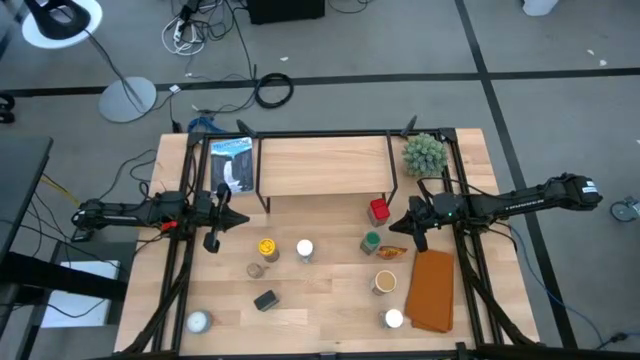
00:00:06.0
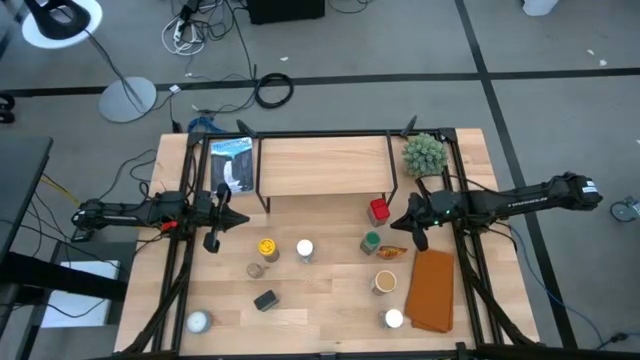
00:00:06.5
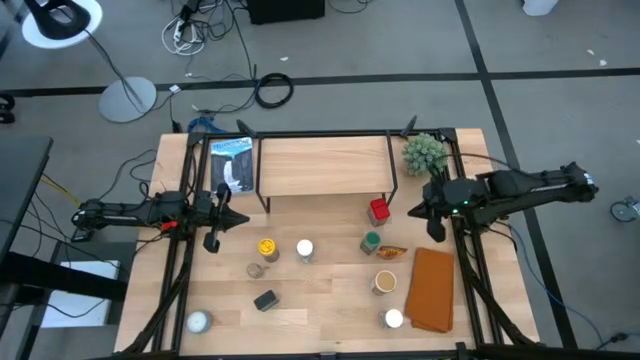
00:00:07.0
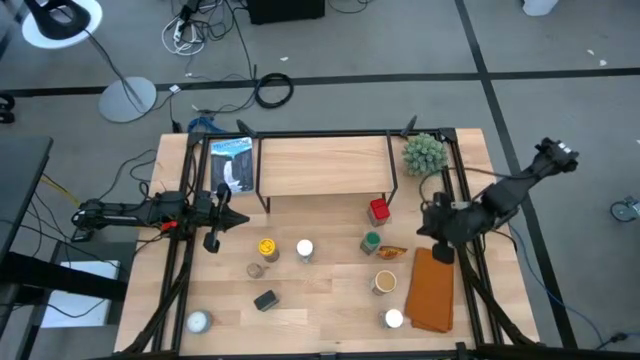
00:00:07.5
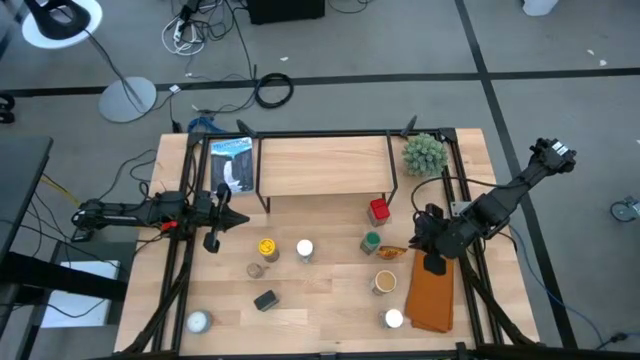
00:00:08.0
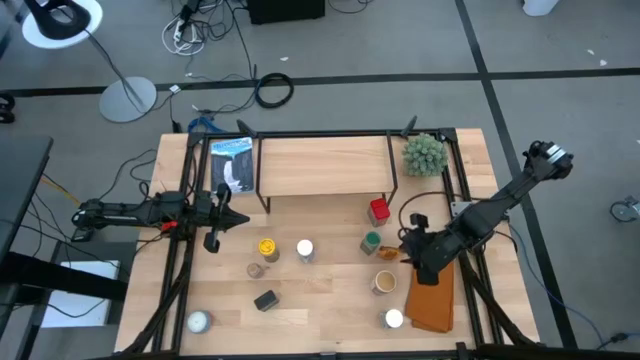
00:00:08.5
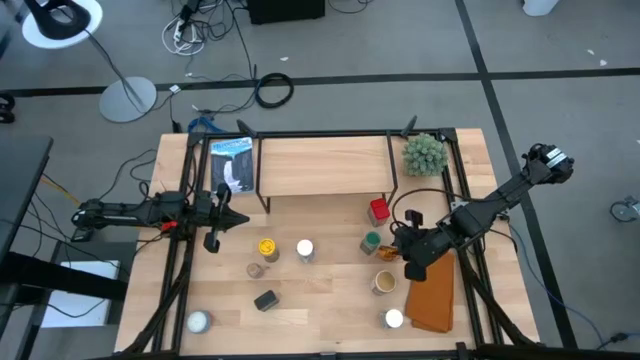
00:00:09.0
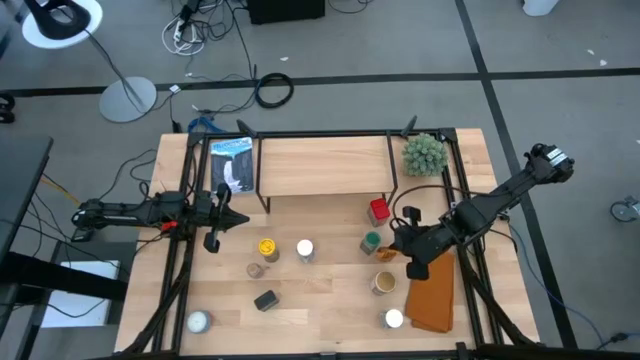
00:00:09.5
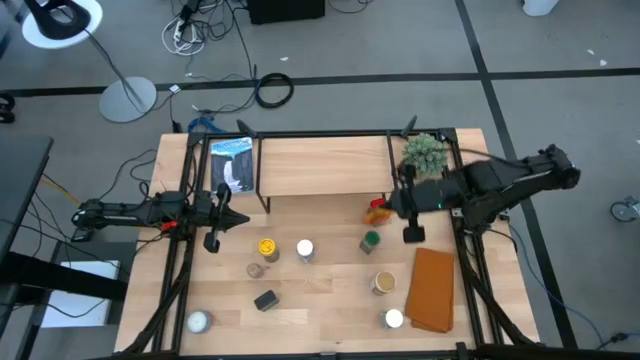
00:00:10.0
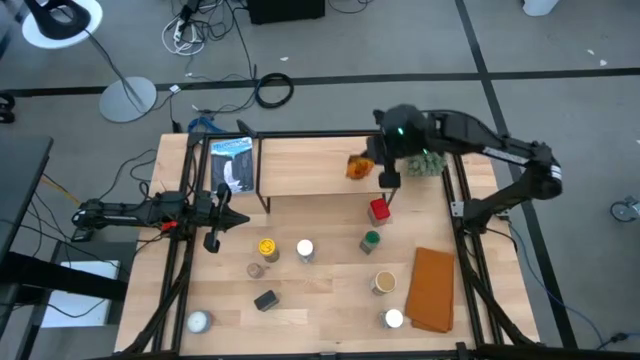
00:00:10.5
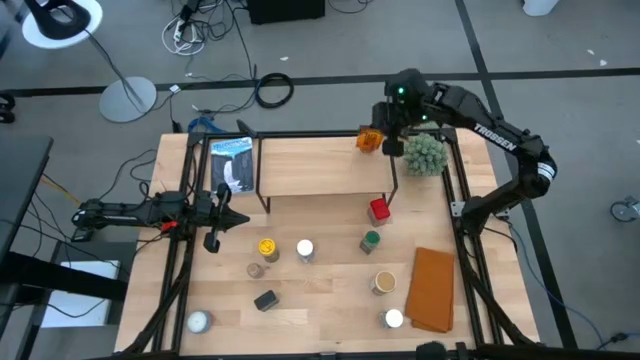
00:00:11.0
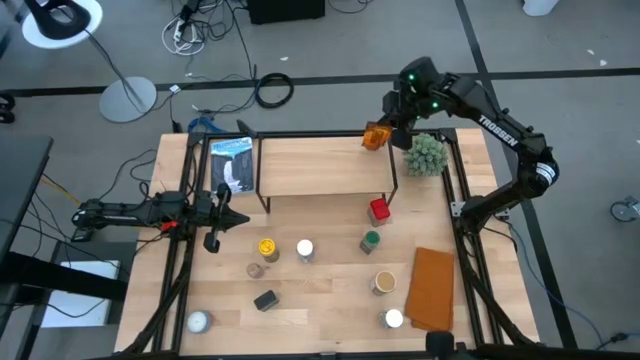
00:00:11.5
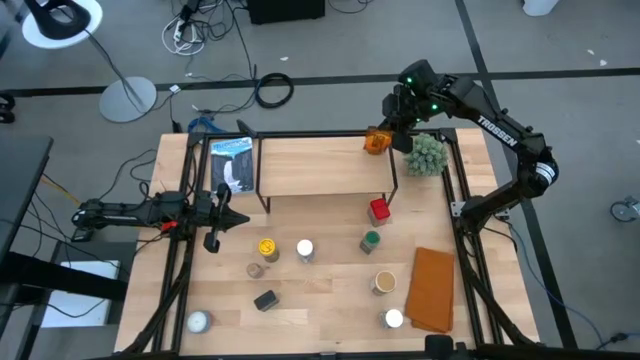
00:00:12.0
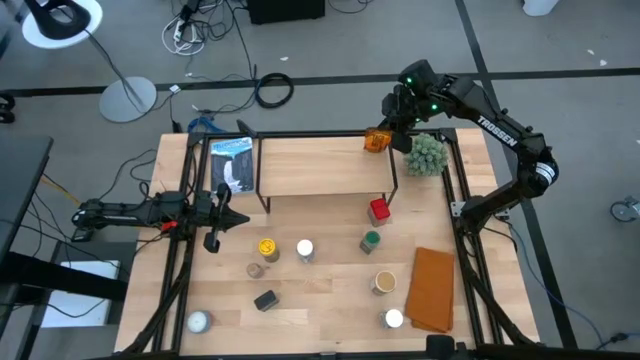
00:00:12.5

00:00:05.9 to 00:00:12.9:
Task: Shelf spices
Put the orange seasoning pack on the shelf

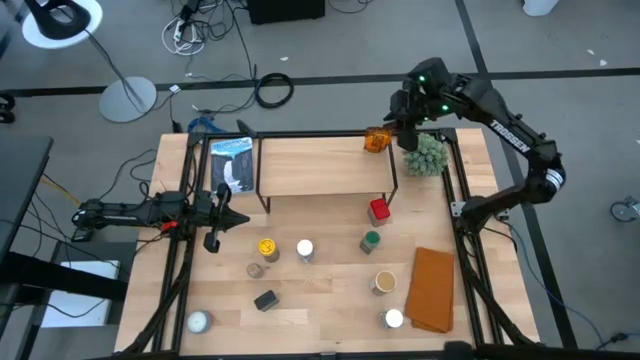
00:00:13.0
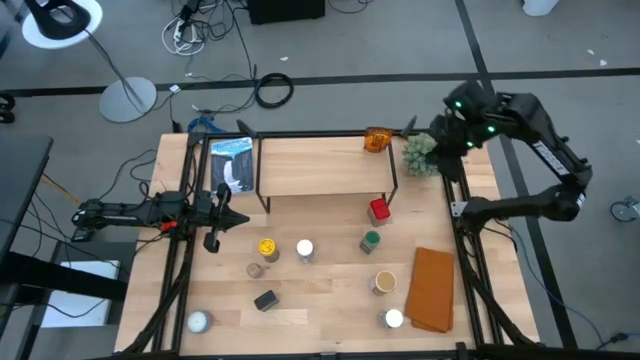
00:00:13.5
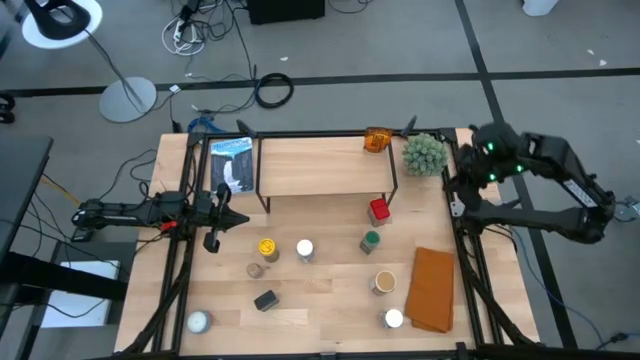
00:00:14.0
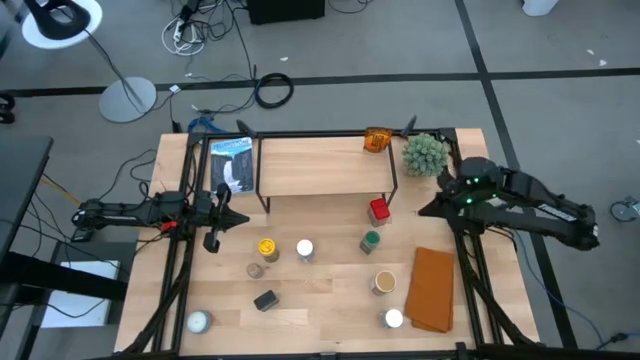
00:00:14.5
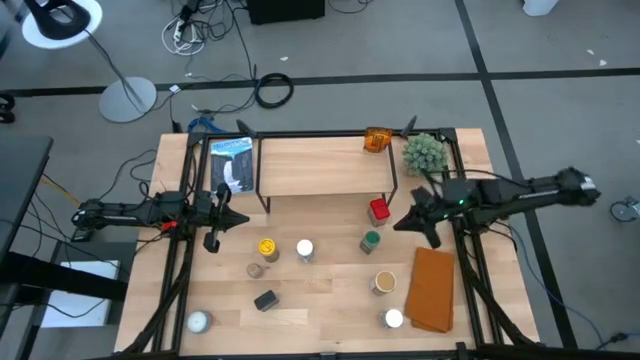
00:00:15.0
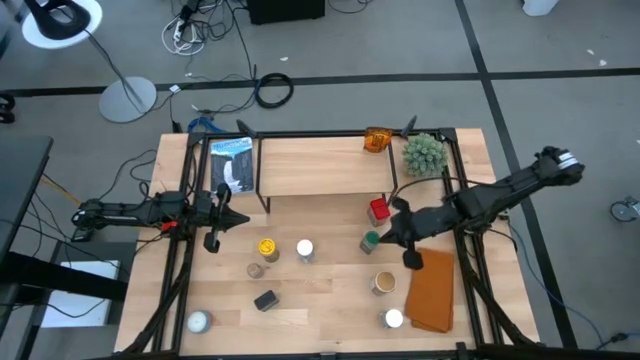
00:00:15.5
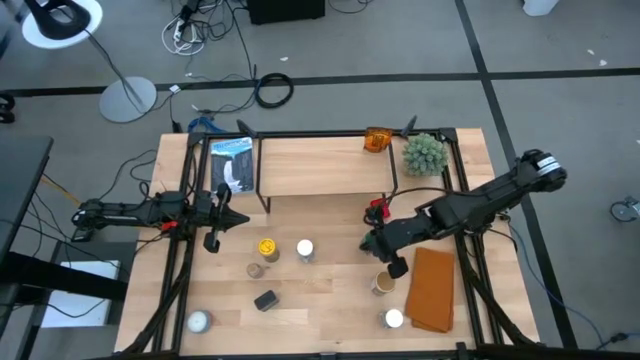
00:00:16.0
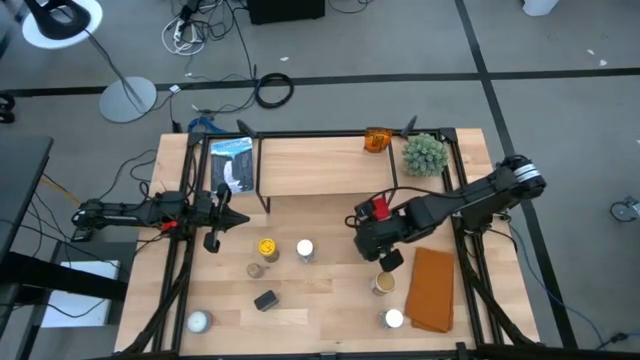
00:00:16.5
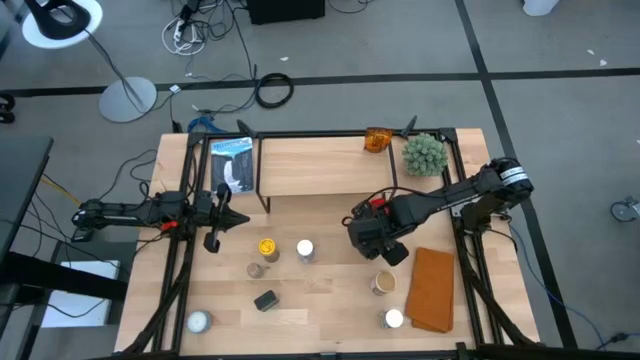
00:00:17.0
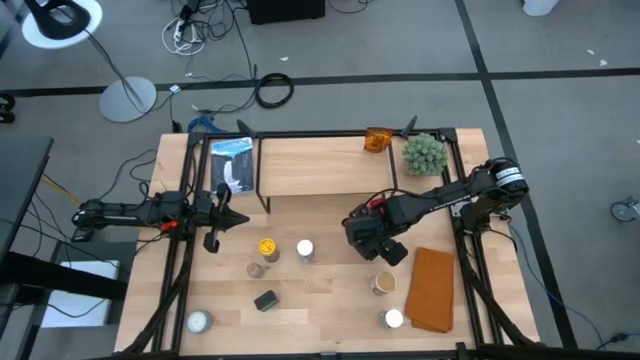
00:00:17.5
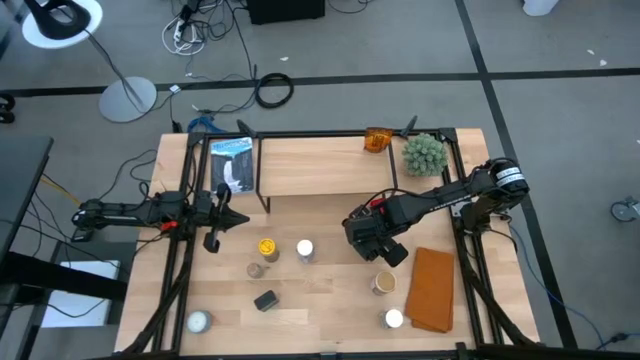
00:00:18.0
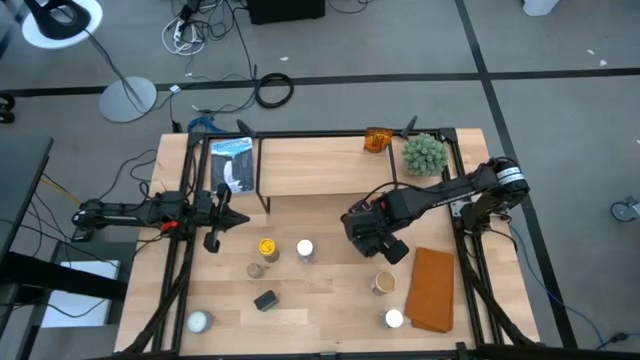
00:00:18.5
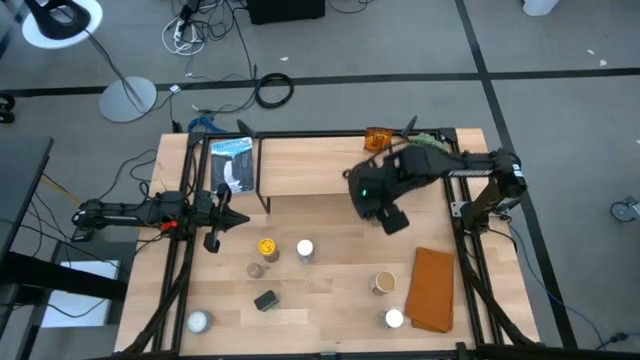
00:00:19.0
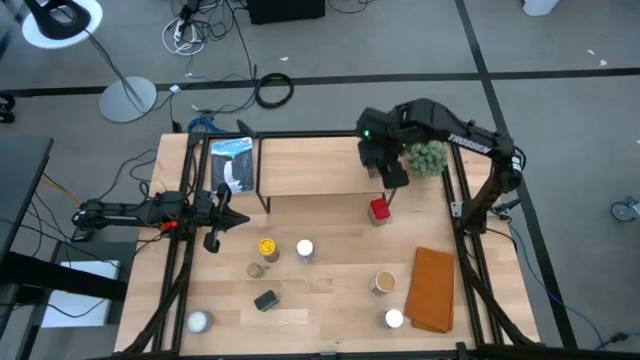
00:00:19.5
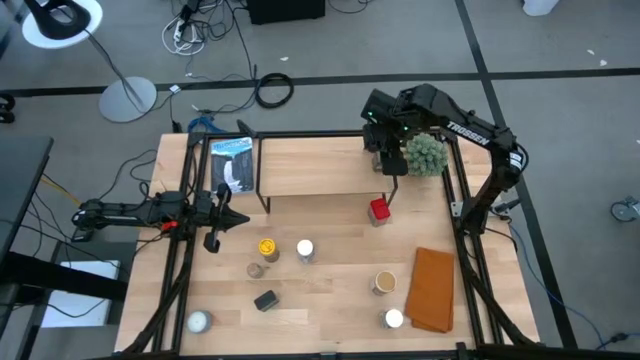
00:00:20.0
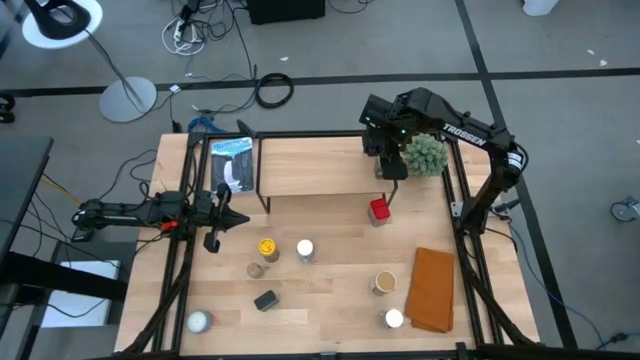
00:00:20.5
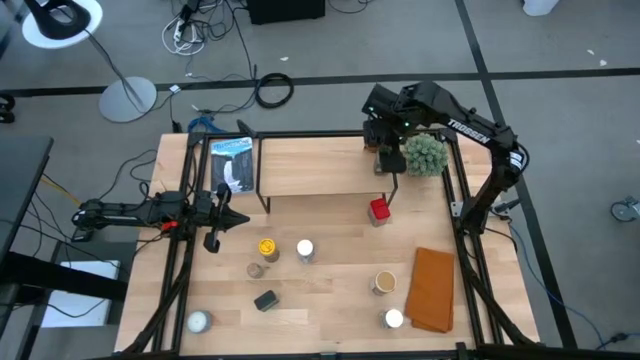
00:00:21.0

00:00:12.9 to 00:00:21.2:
Put the green seasoning bottle on the shelf

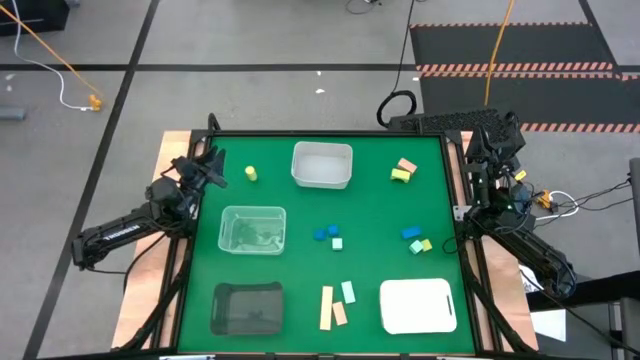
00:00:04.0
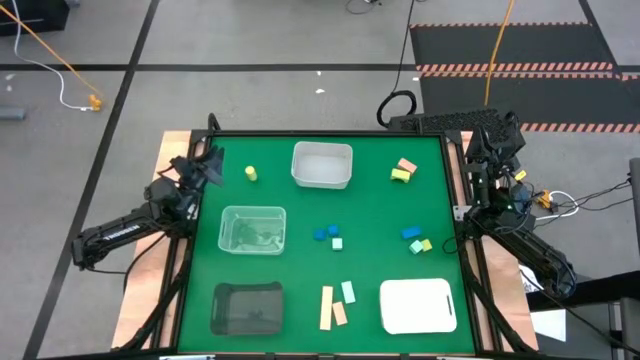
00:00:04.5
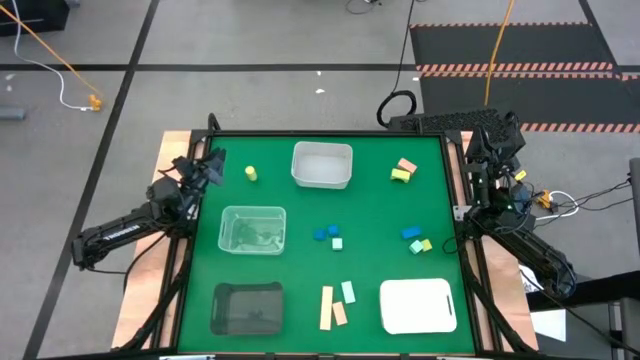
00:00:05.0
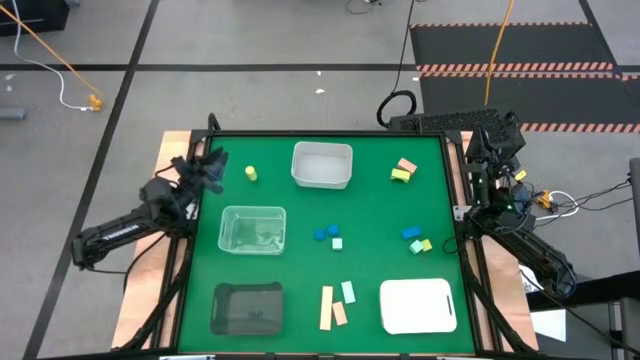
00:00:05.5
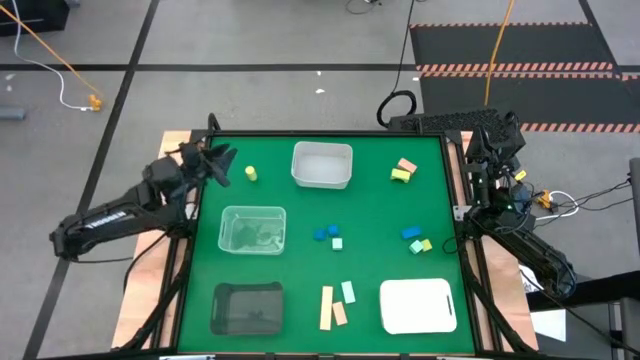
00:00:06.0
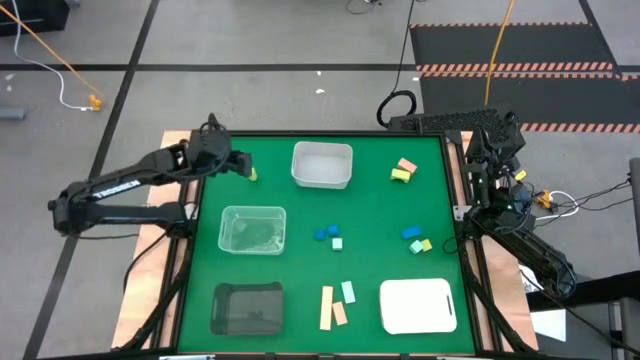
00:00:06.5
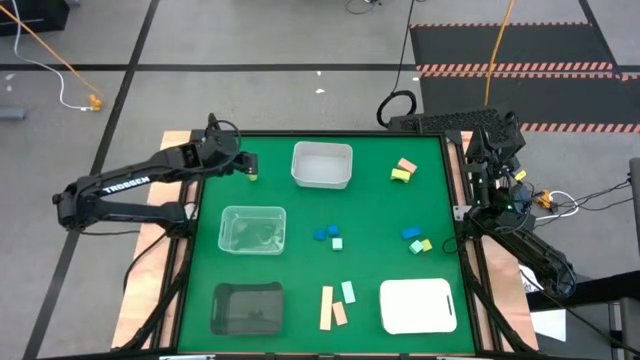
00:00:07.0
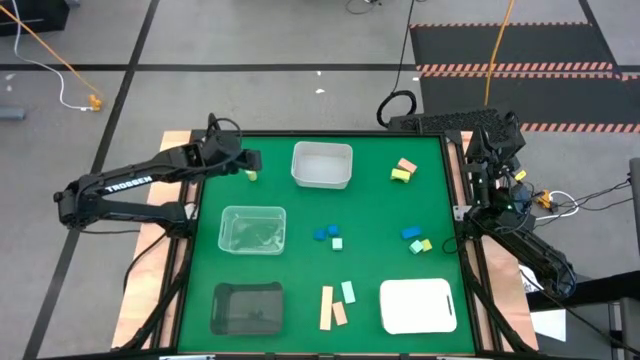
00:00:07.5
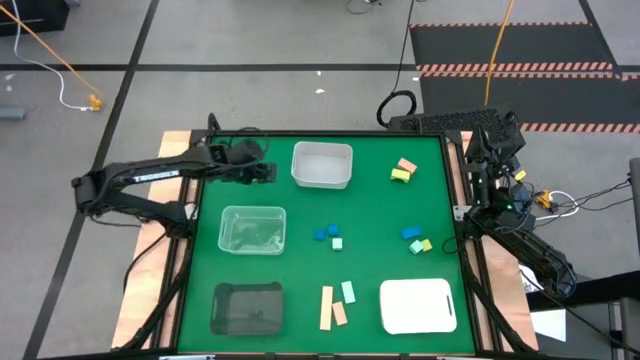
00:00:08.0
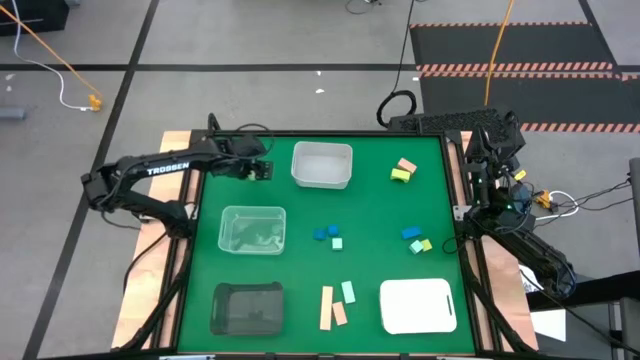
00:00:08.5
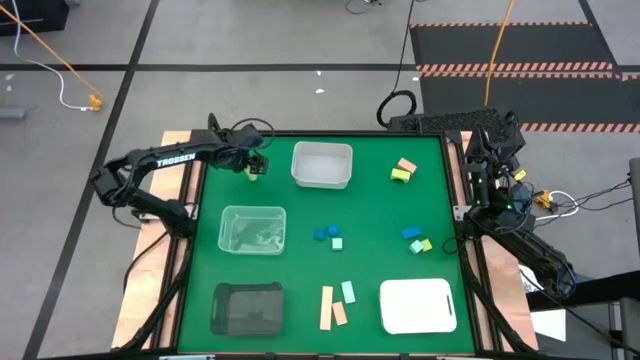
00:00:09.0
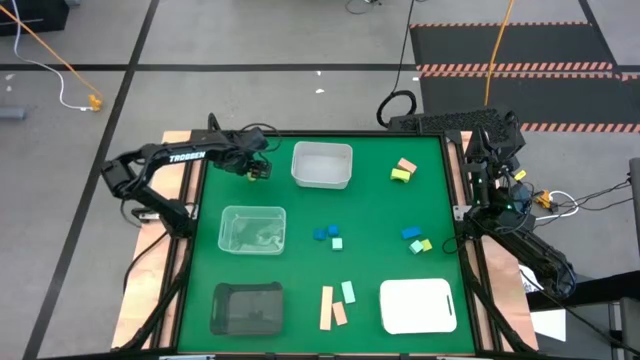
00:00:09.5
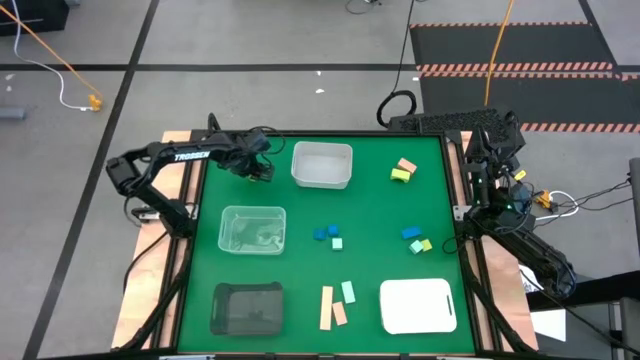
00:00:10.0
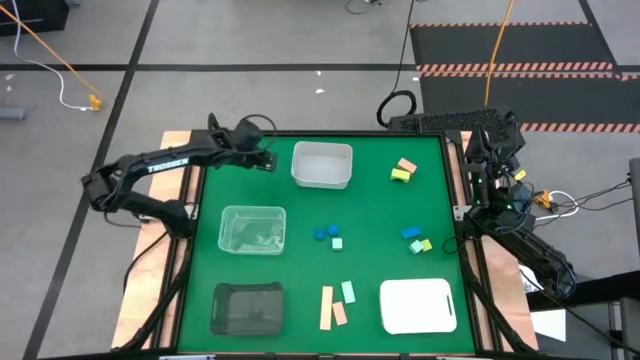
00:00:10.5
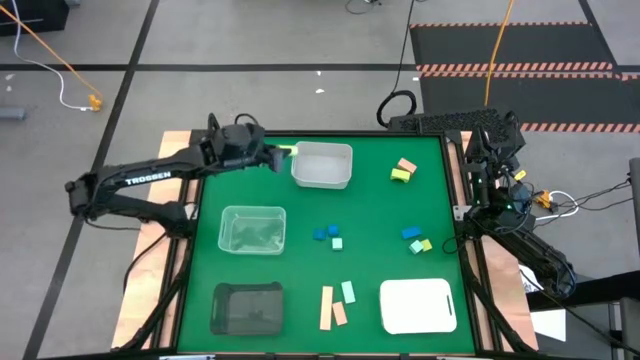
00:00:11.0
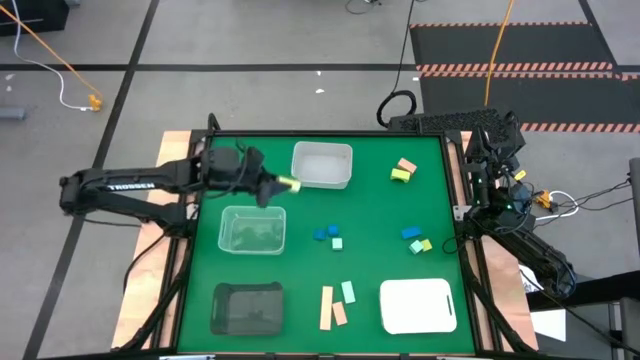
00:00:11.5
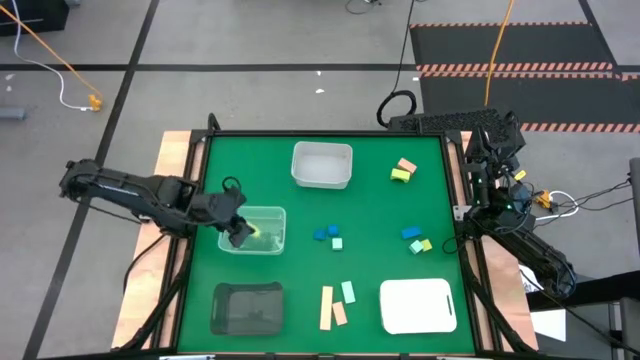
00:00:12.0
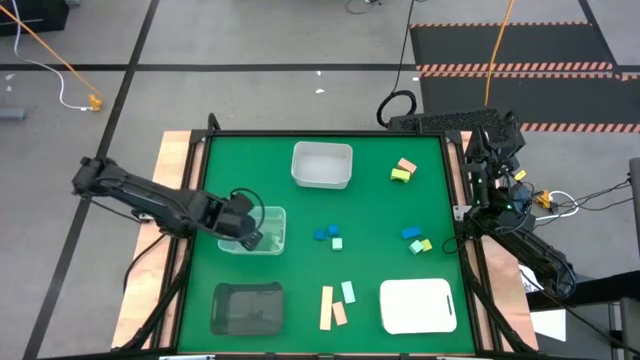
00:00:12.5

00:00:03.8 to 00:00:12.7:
Task: Sort & place blocks by color
Put the top left yellow cylinder block into the transparent bin
